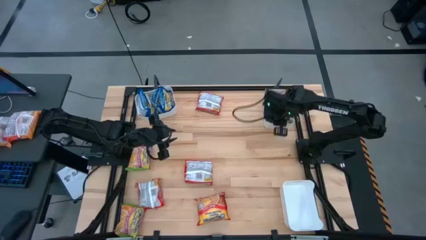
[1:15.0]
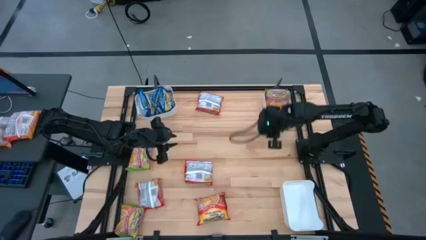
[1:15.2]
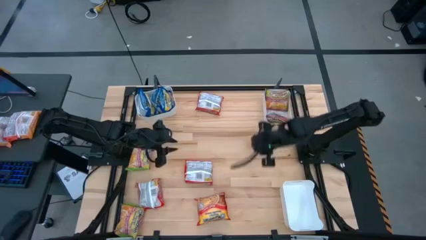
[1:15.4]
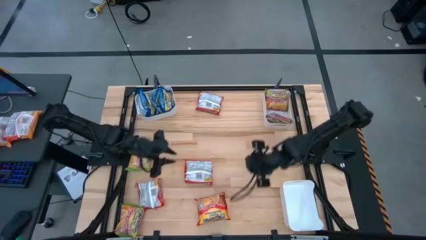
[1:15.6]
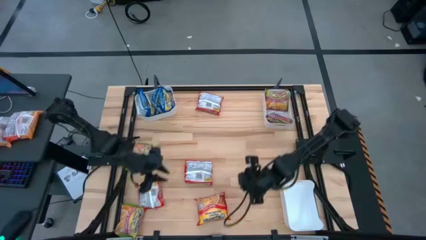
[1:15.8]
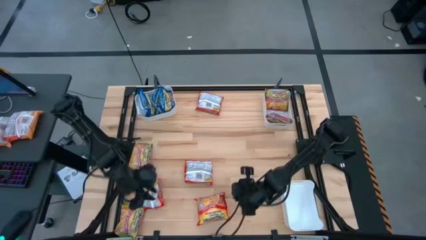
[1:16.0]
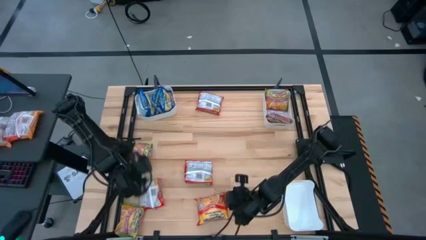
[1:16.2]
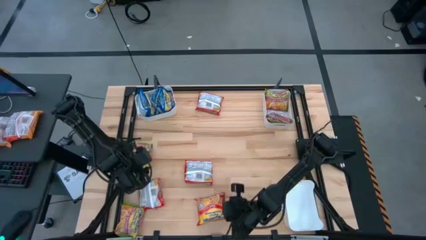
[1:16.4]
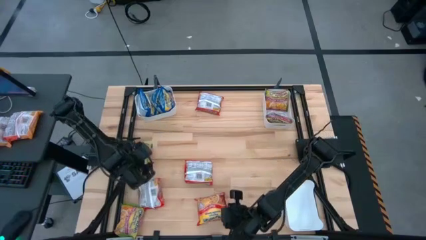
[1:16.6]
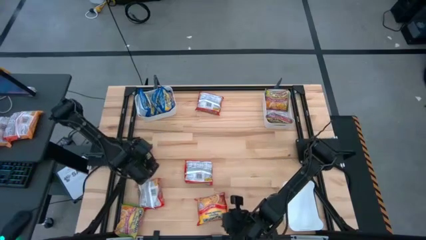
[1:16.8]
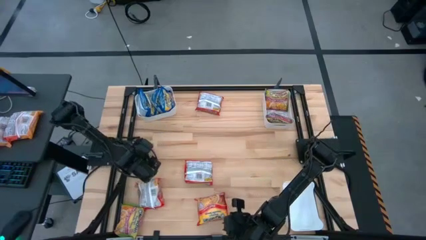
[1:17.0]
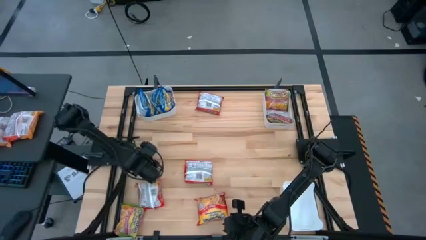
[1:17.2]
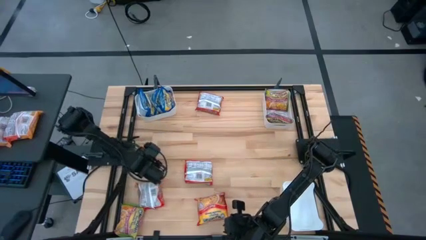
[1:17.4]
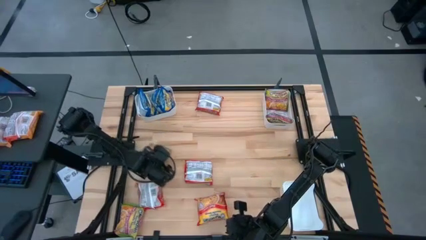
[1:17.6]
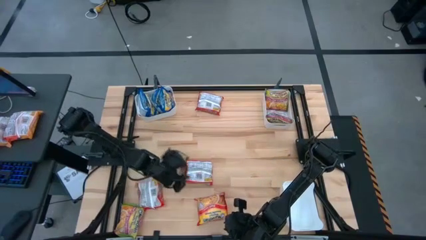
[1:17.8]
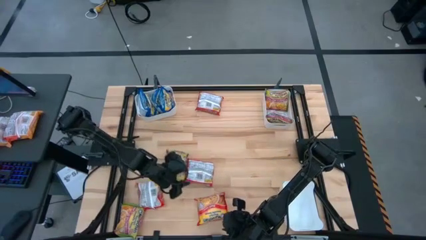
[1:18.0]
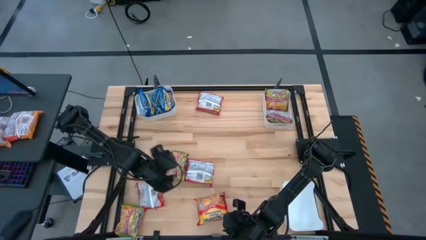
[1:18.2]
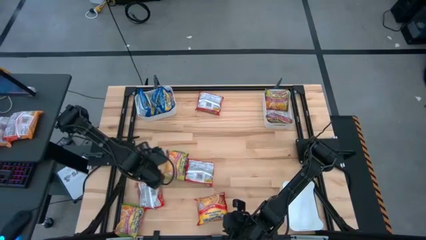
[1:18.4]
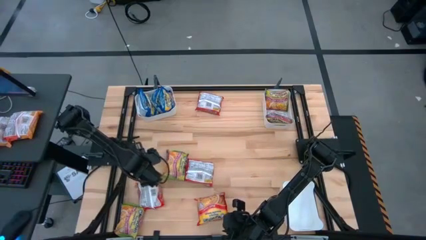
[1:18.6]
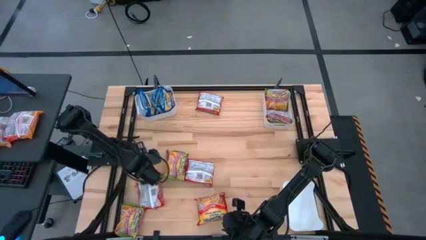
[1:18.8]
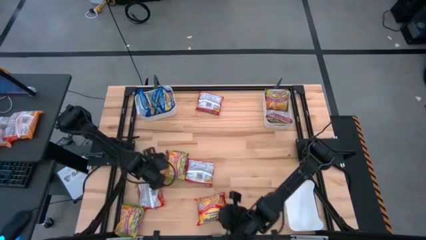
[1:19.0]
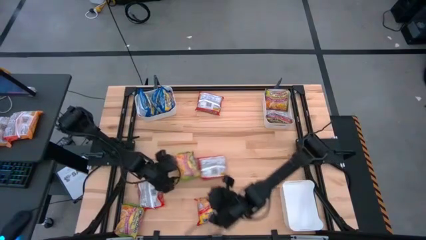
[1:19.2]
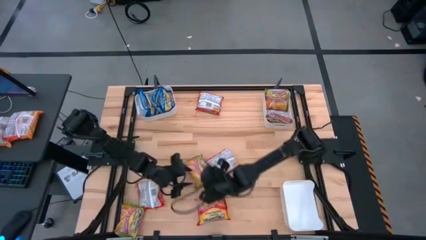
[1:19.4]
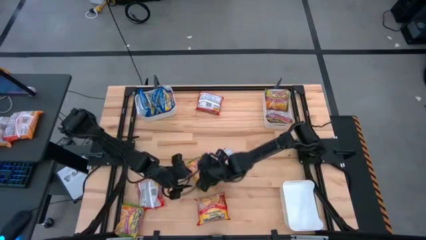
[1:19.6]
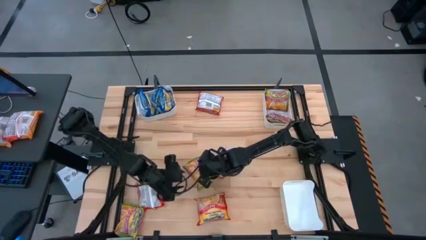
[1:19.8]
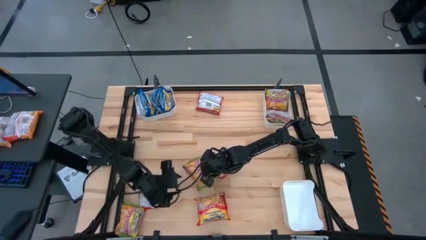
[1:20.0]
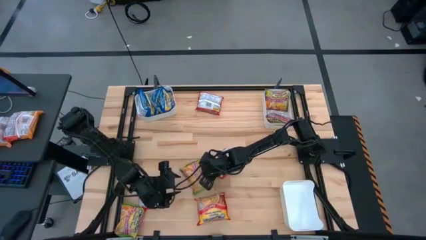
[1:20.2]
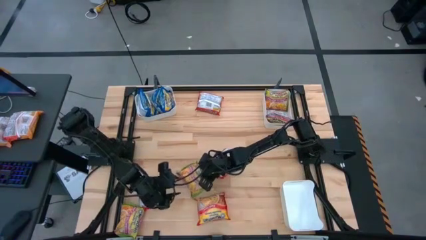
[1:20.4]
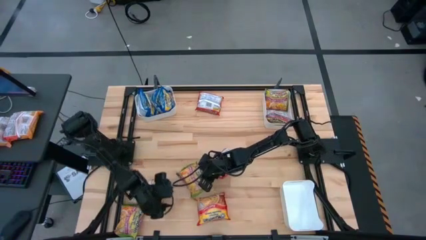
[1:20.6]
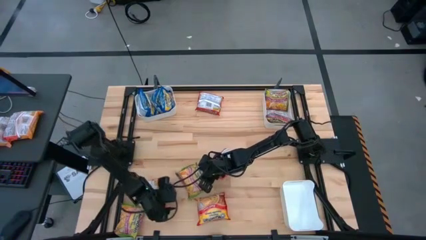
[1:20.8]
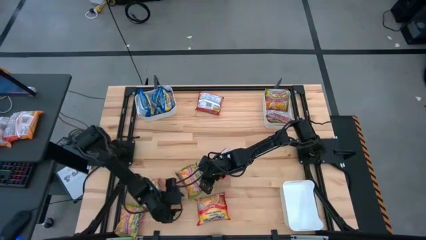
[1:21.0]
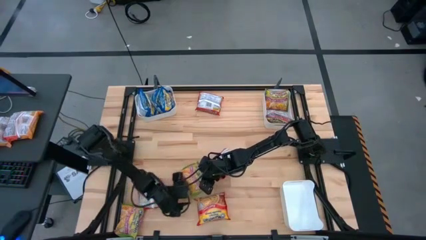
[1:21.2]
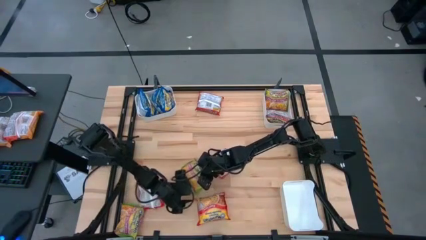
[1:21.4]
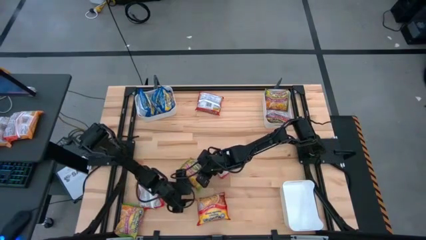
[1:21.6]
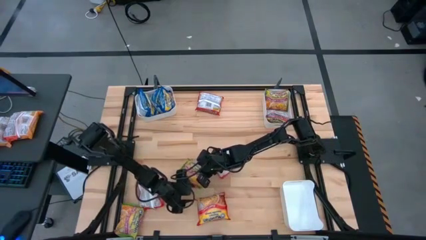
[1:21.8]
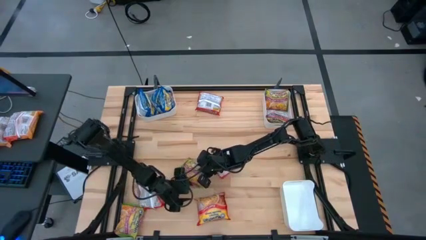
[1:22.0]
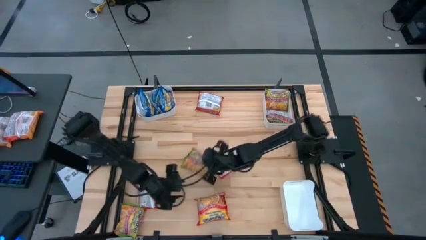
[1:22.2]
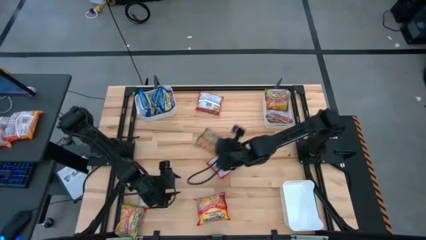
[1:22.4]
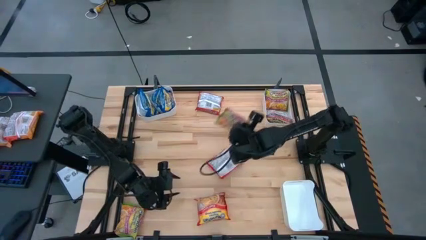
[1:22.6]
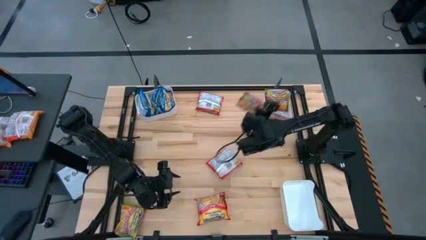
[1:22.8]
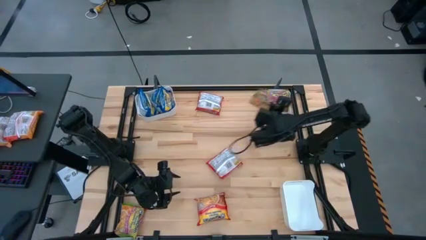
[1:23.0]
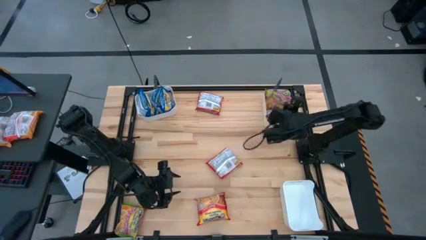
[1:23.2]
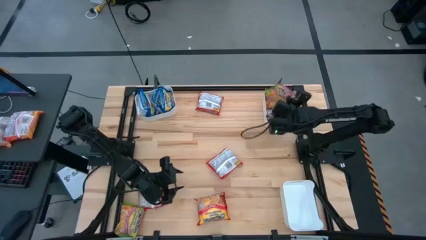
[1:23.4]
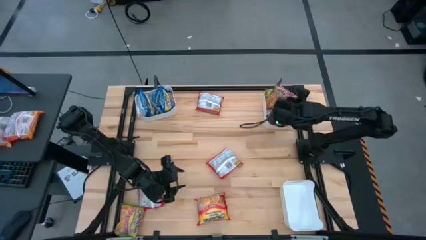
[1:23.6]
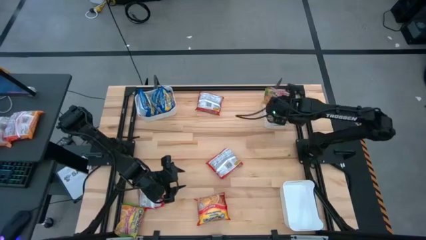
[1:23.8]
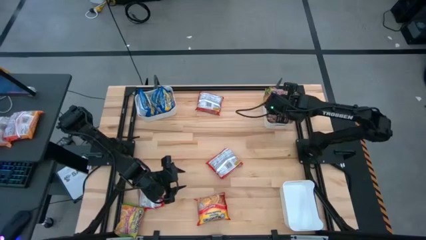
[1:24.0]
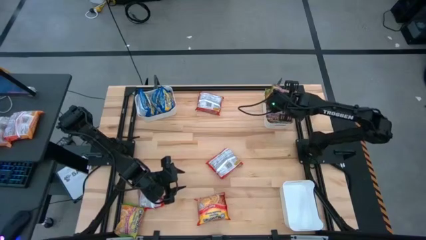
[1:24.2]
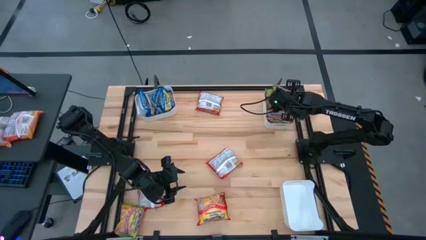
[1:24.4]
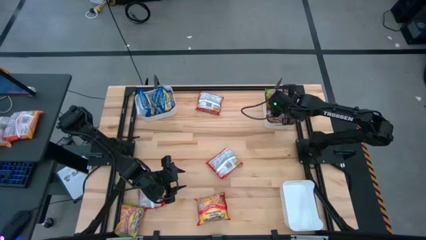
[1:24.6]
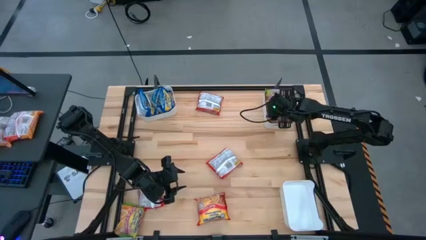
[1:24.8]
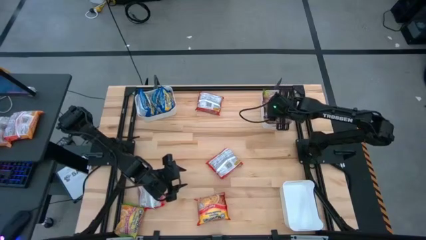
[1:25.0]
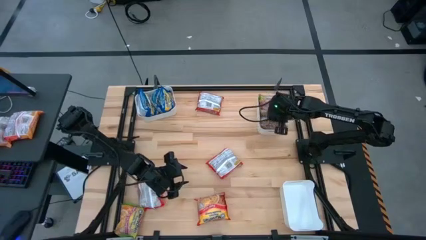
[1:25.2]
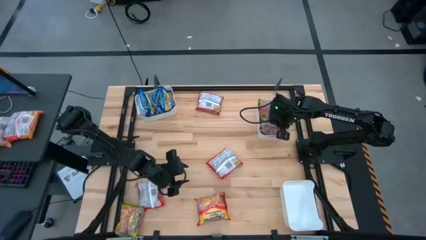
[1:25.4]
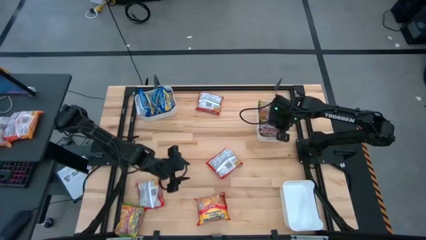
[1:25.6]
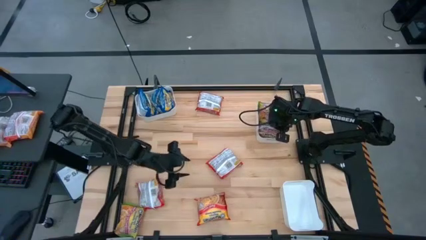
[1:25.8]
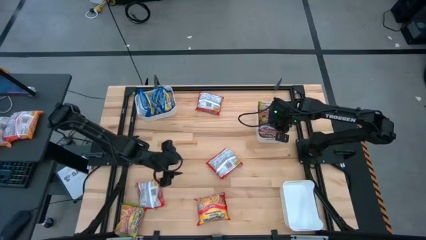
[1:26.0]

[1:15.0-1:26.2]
Task: Sort Maruchan noodles
Put the green noodle pack into the top right white bin
